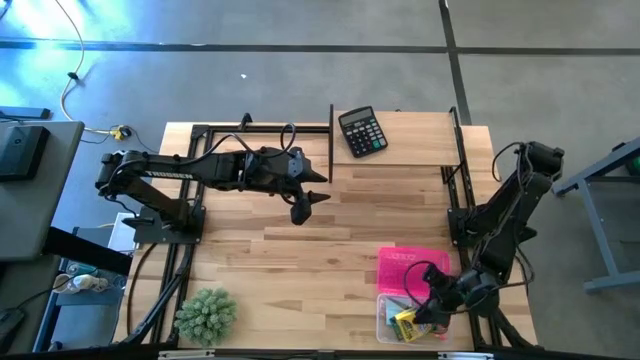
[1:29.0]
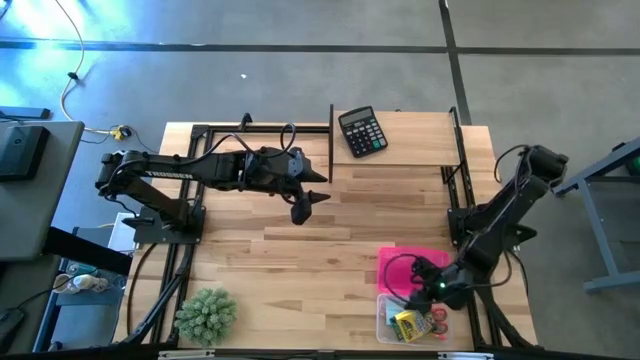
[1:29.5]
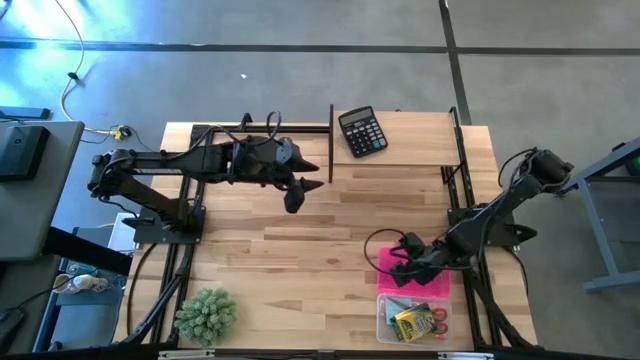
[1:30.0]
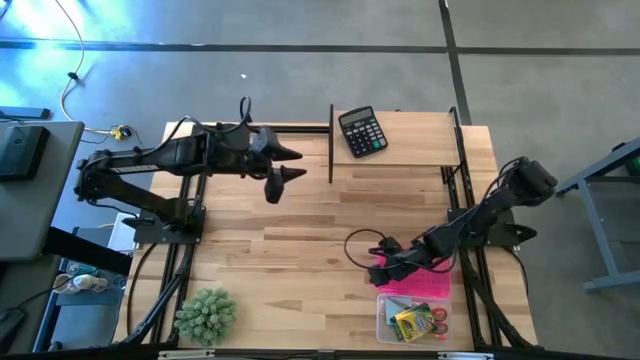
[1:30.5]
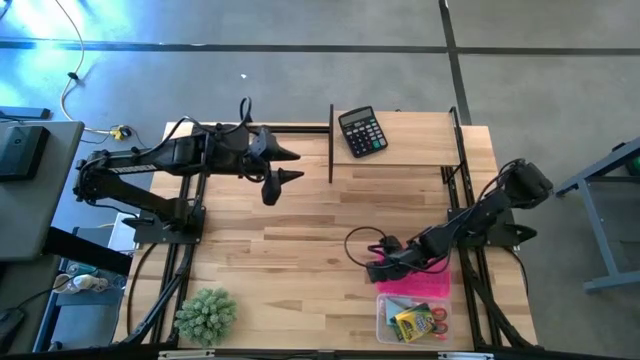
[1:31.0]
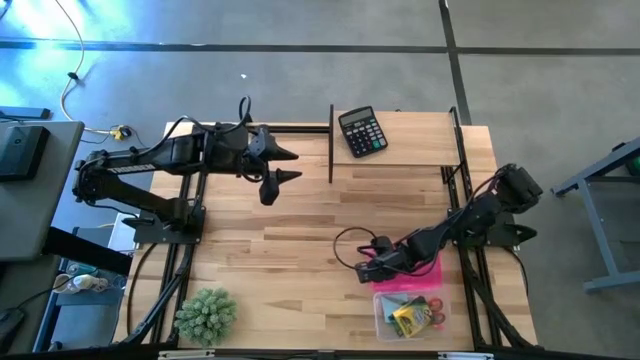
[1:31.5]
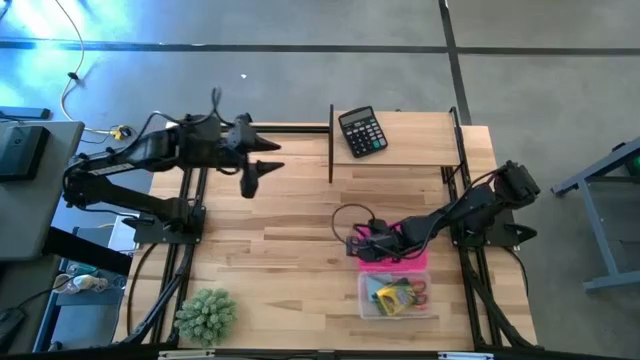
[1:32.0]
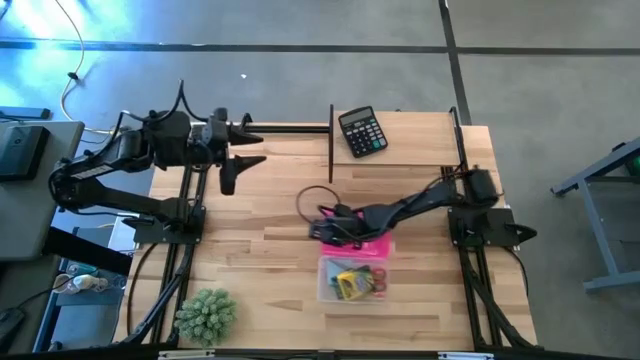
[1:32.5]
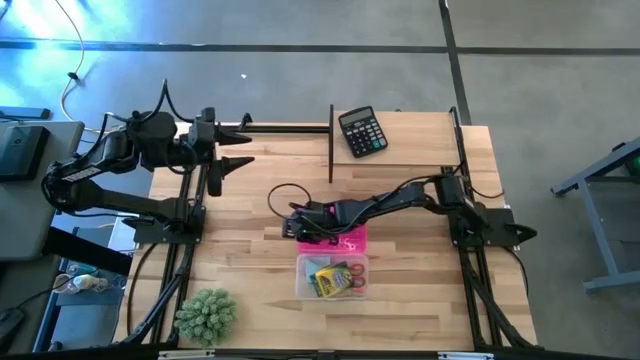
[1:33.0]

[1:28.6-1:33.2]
Task: Pack school essentials
Move the supply box to the center of the table

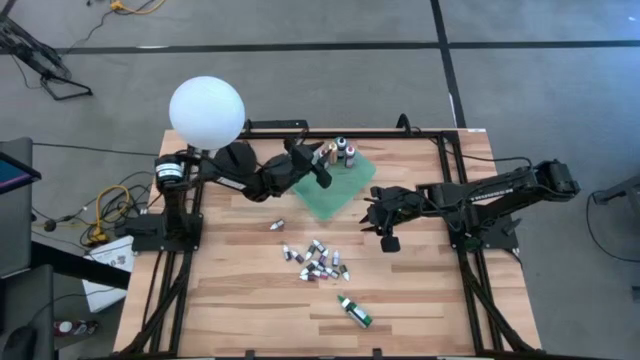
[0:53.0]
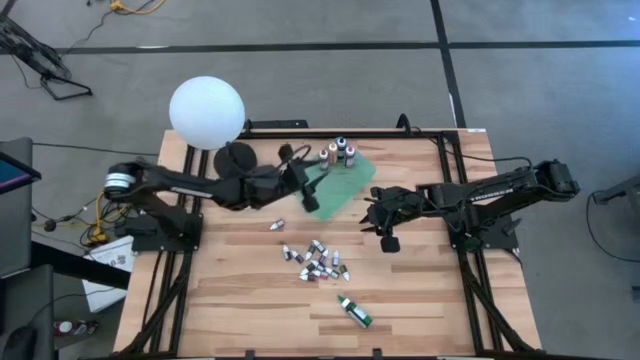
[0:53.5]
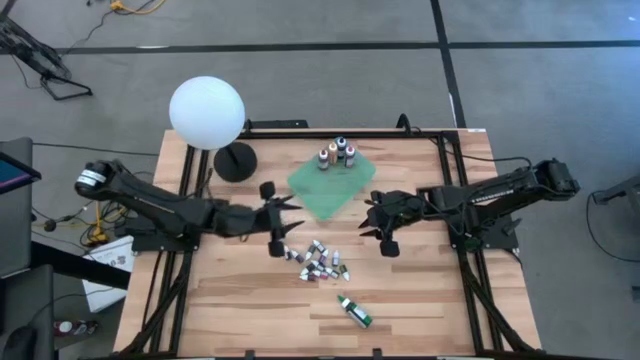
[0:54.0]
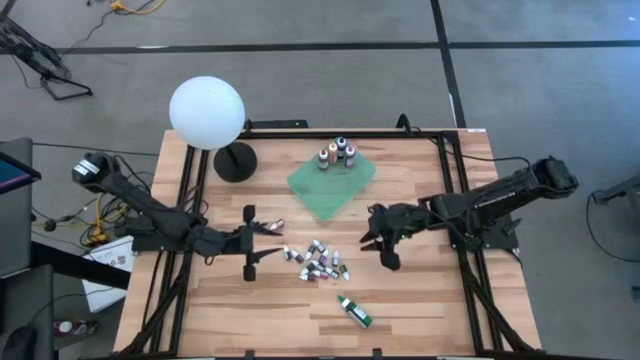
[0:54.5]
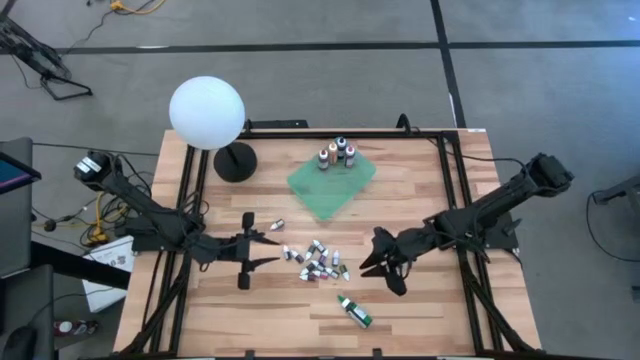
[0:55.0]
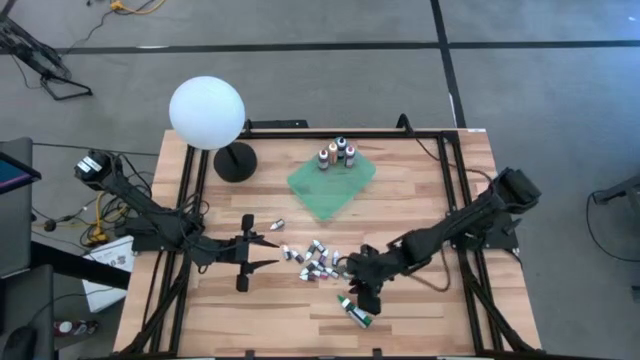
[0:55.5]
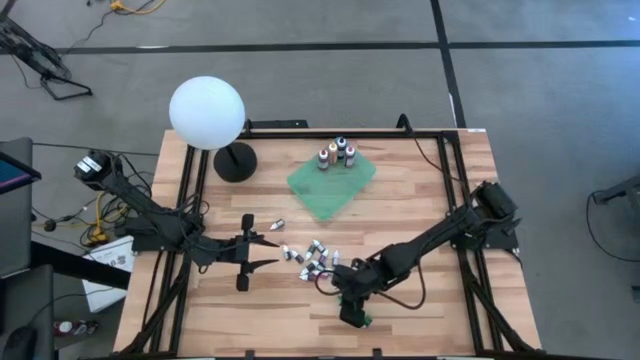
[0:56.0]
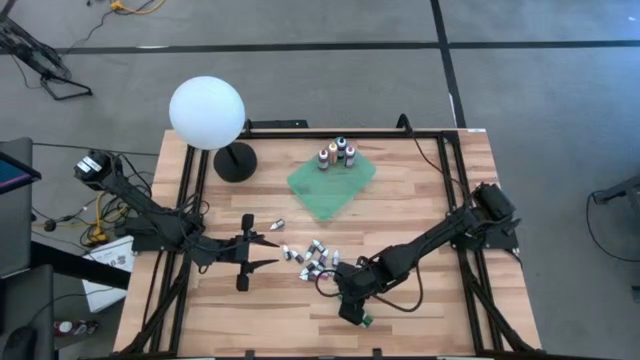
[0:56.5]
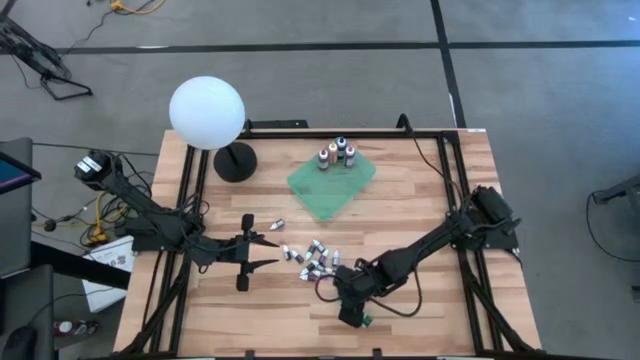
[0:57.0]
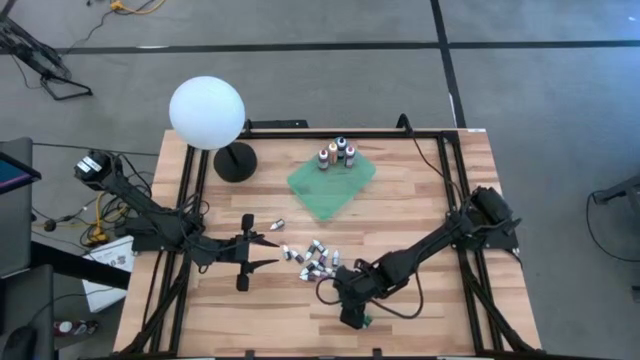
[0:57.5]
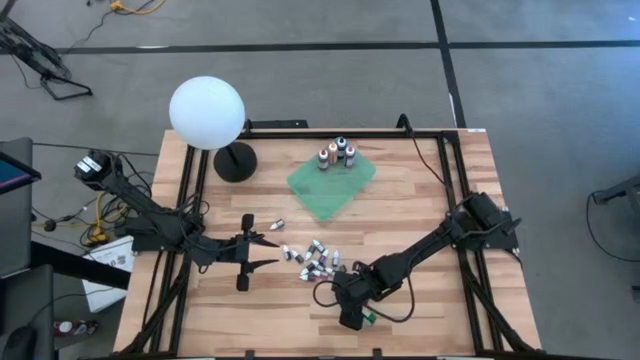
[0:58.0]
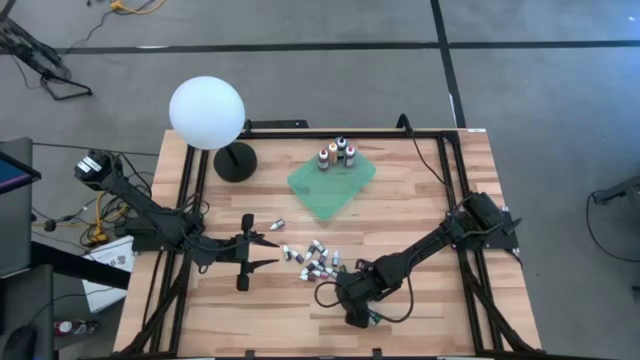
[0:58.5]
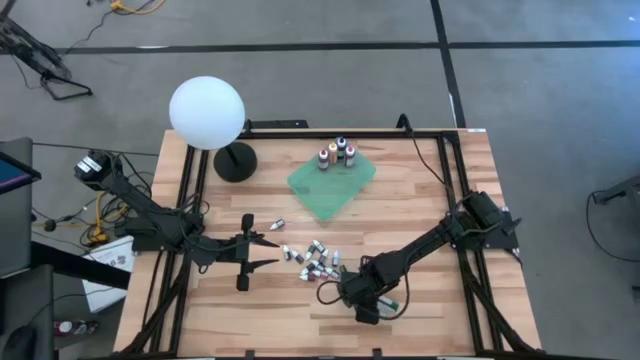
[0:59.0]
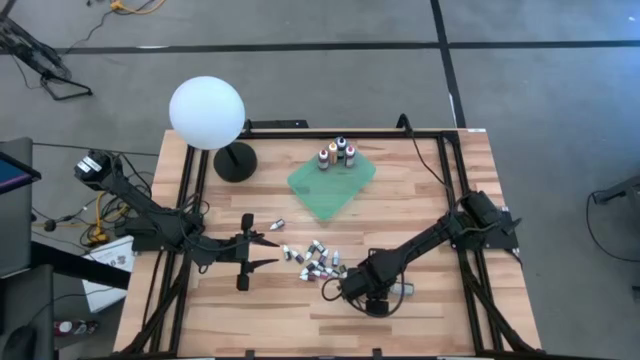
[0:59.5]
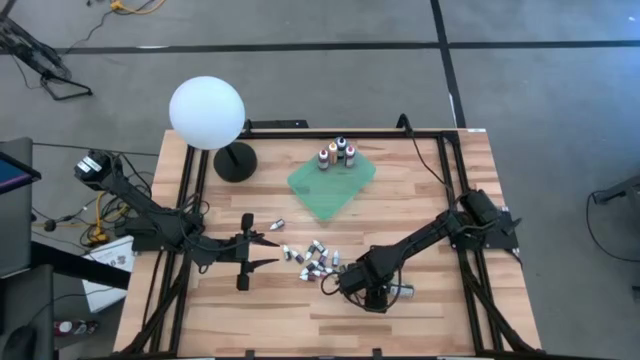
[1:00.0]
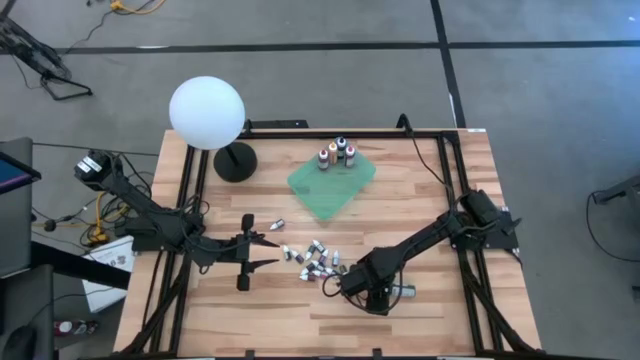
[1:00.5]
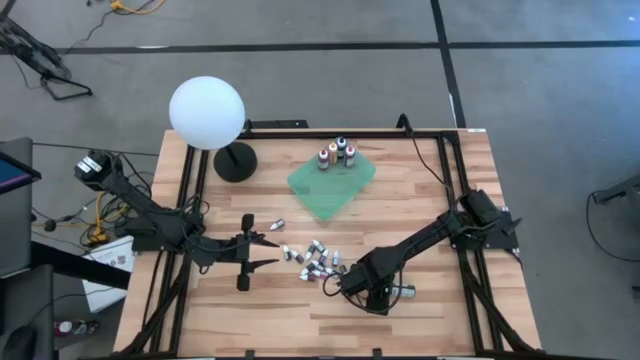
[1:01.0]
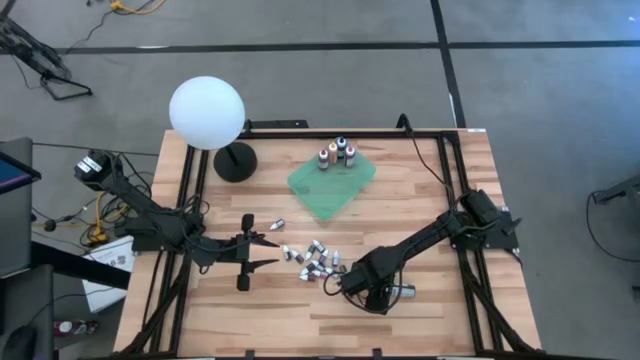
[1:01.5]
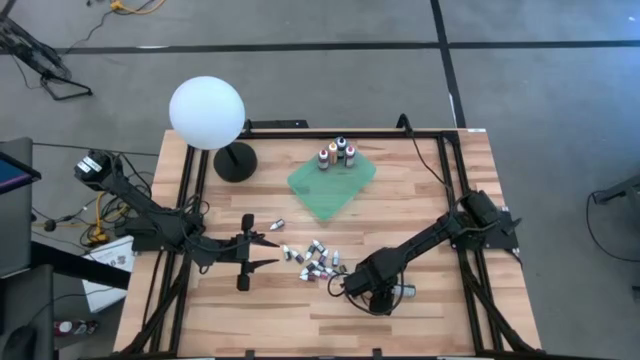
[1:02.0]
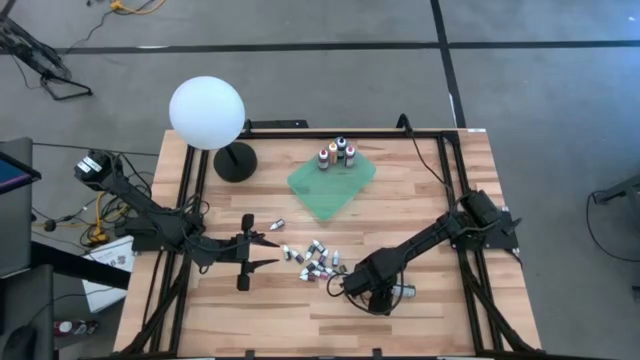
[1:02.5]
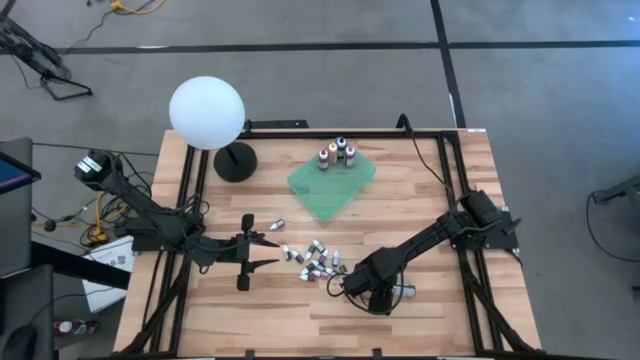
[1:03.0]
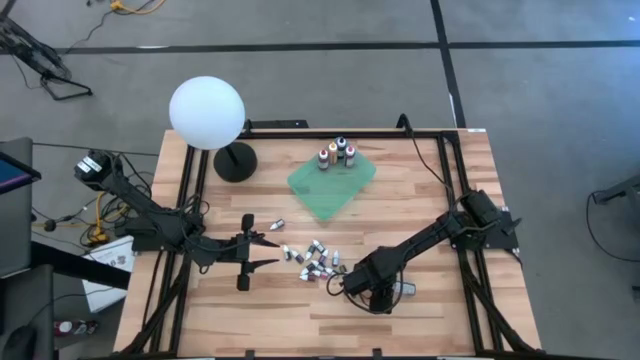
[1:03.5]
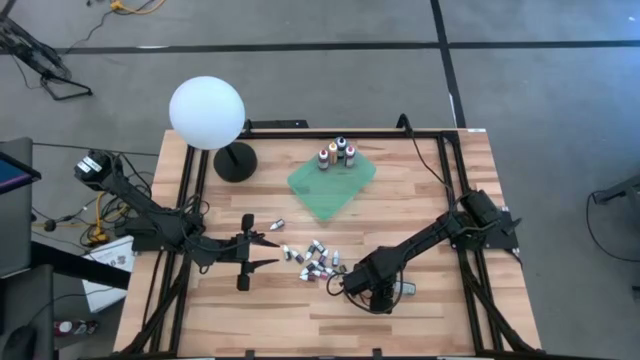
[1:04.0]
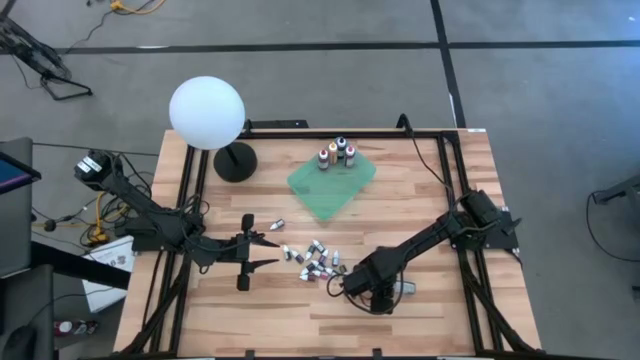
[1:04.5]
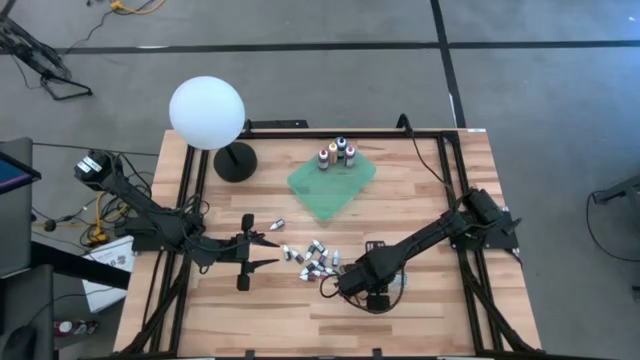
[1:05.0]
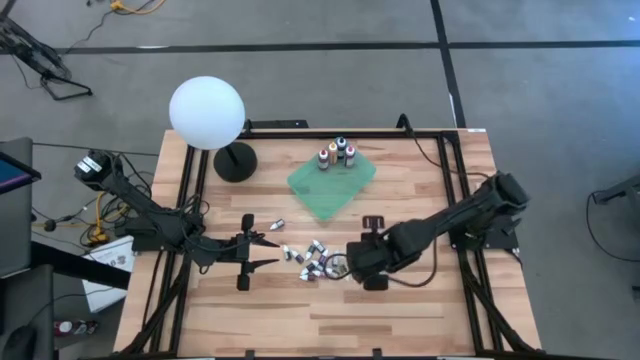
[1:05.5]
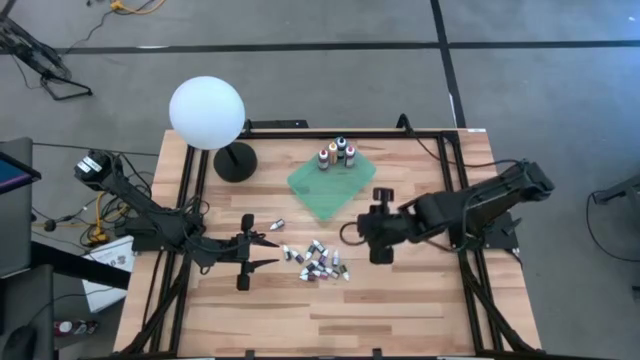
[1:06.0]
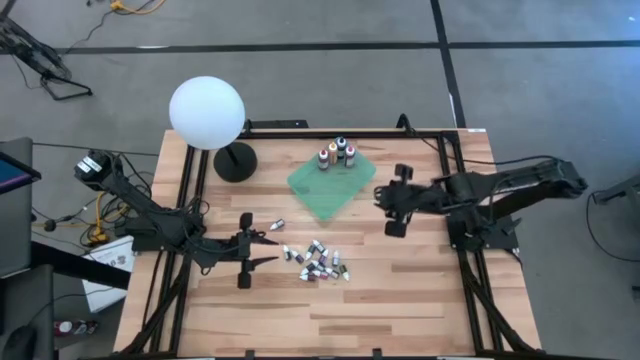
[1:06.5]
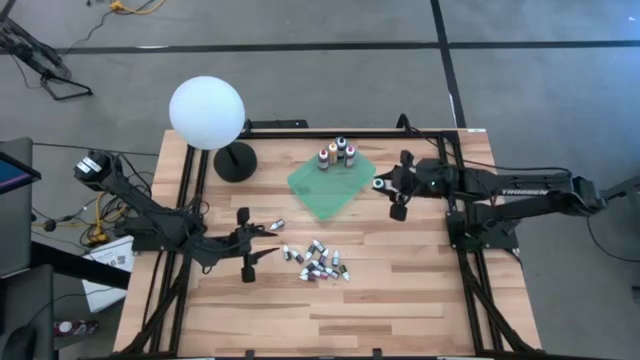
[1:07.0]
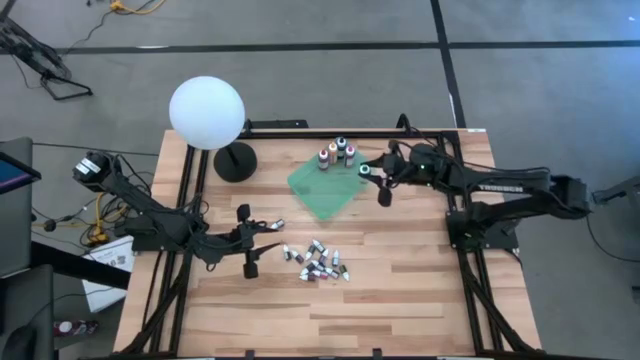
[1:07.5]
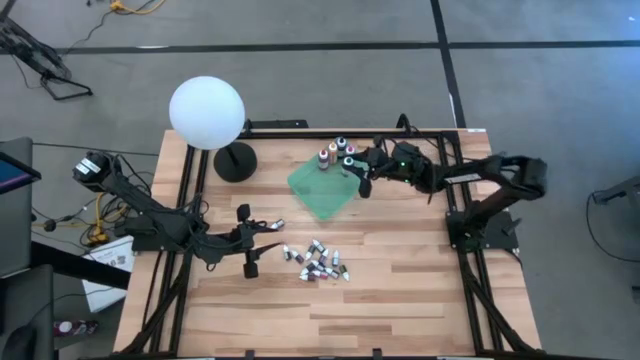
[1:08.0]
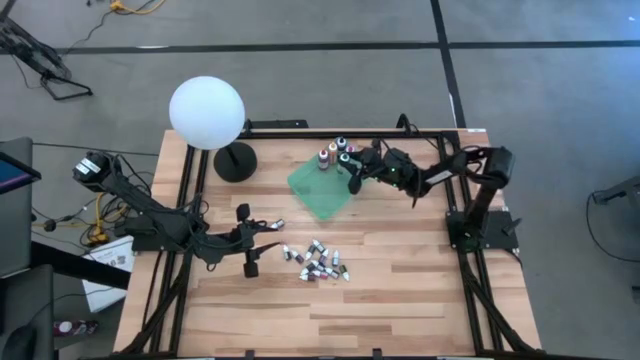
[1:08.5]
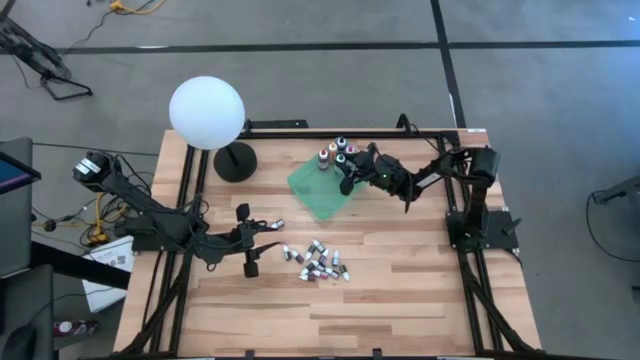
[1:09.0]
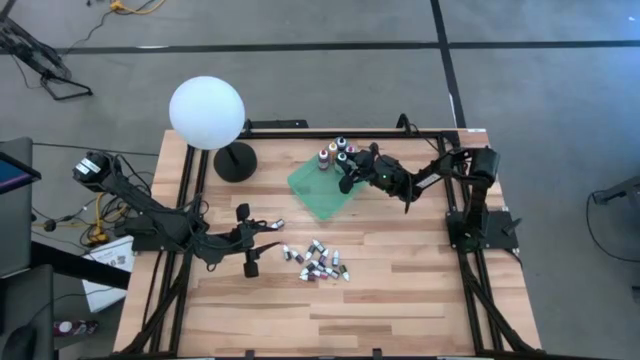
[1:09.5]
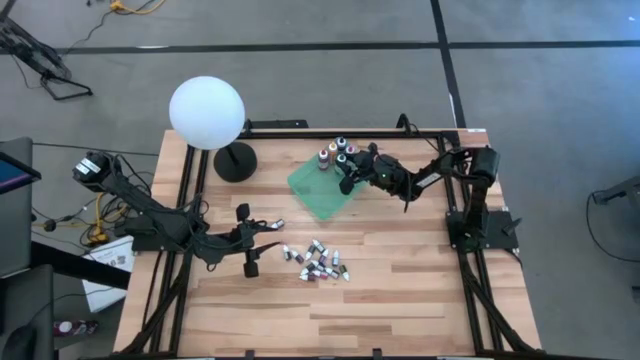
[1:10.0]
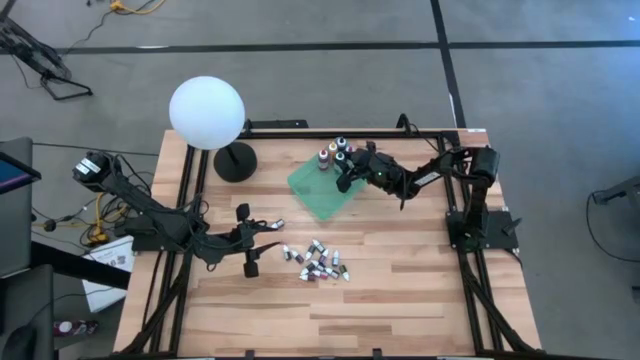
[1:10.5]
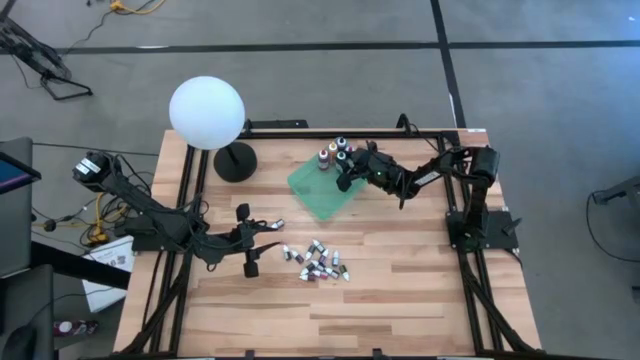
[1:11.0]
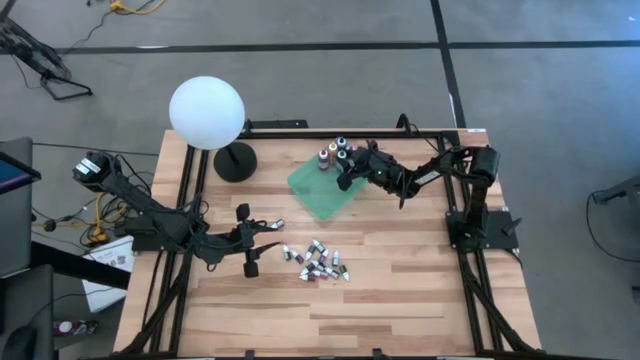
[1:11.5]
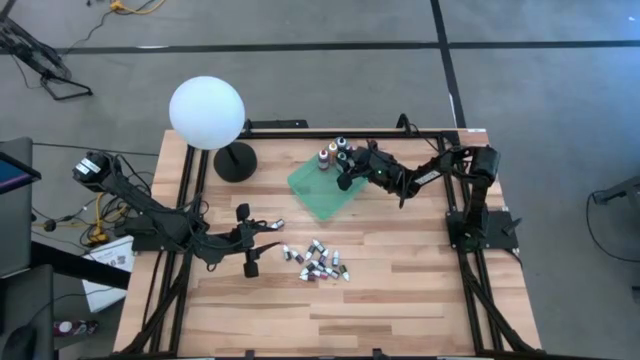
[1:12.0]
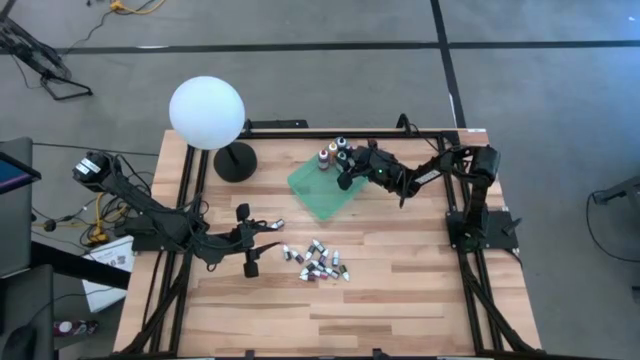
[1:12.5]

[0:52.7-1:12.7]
Task: Pick & Place food coloring
Put the bottom green food coloring bottle into the green bin
